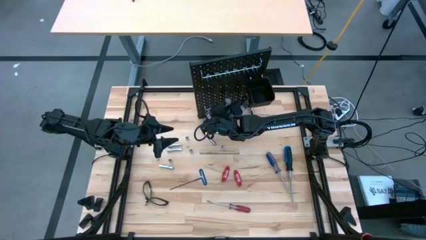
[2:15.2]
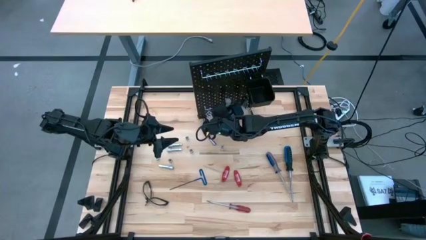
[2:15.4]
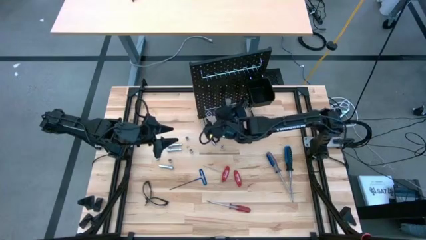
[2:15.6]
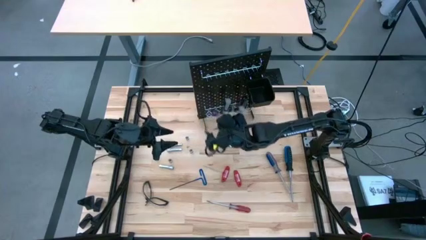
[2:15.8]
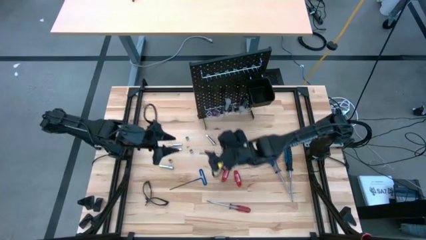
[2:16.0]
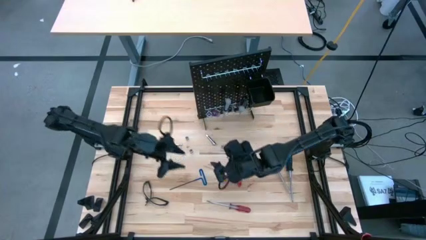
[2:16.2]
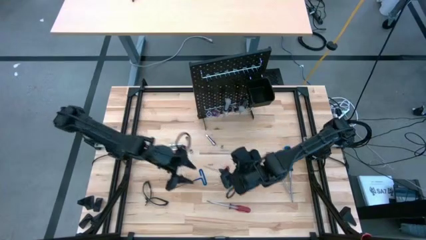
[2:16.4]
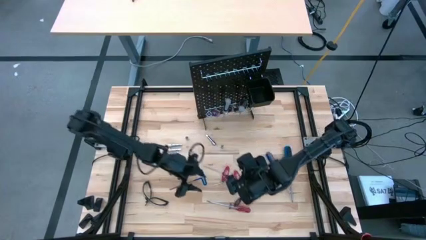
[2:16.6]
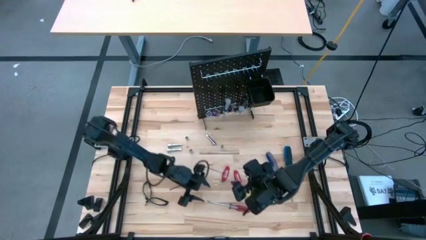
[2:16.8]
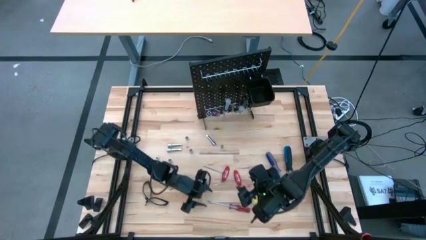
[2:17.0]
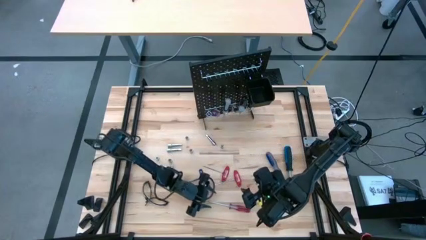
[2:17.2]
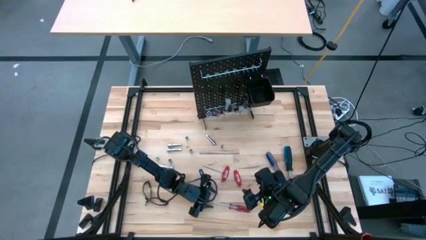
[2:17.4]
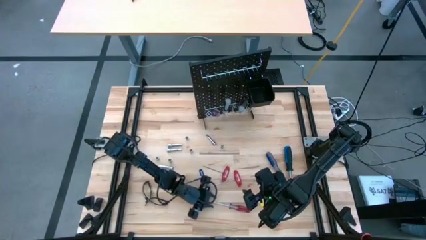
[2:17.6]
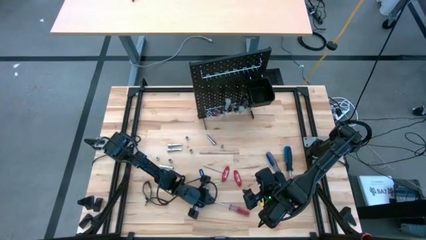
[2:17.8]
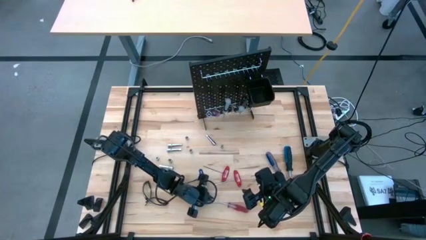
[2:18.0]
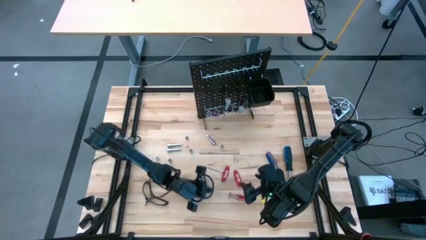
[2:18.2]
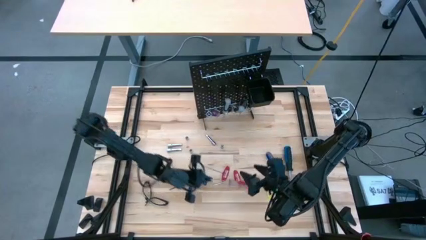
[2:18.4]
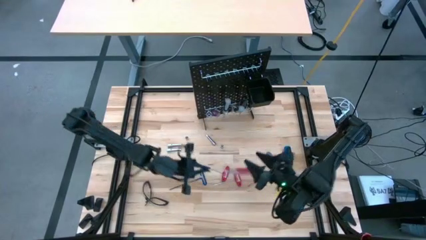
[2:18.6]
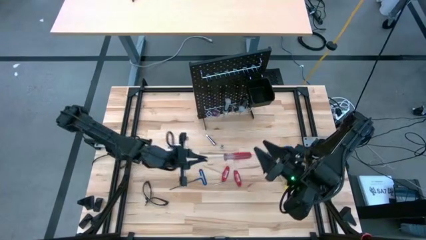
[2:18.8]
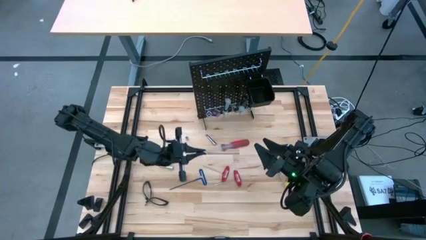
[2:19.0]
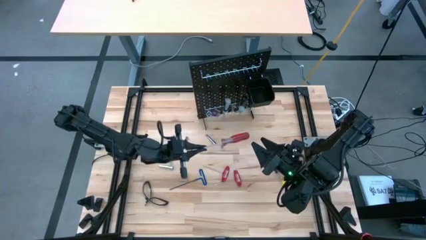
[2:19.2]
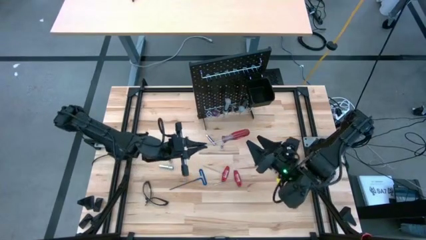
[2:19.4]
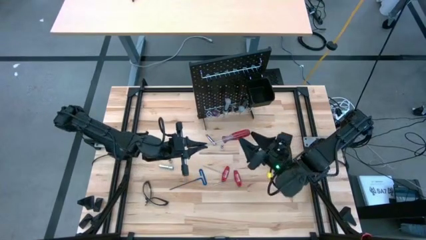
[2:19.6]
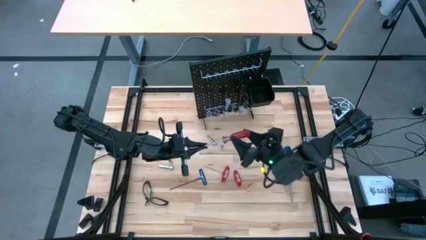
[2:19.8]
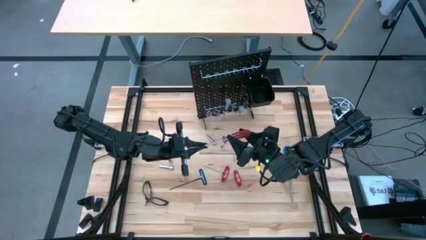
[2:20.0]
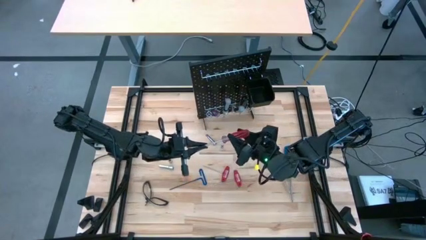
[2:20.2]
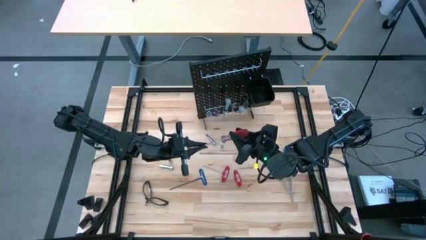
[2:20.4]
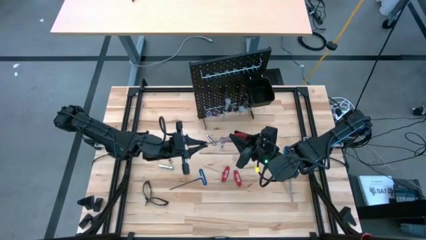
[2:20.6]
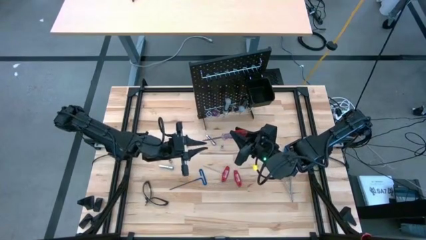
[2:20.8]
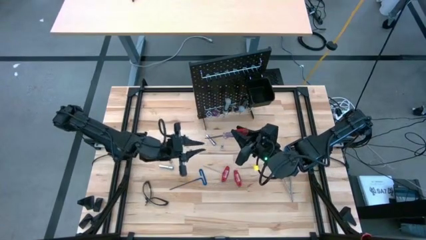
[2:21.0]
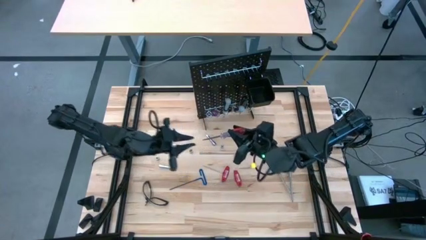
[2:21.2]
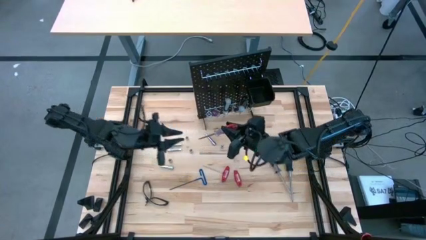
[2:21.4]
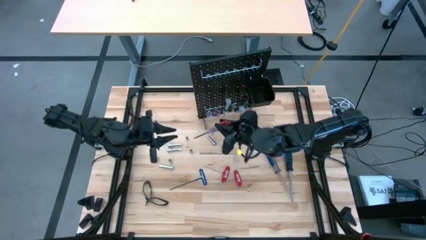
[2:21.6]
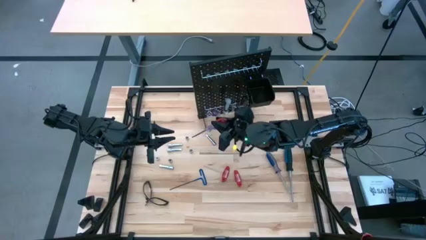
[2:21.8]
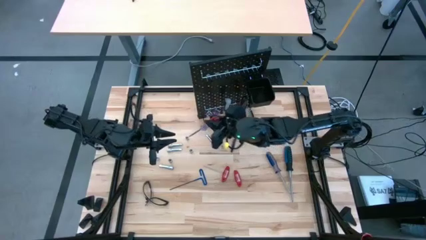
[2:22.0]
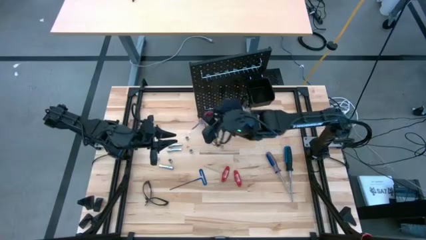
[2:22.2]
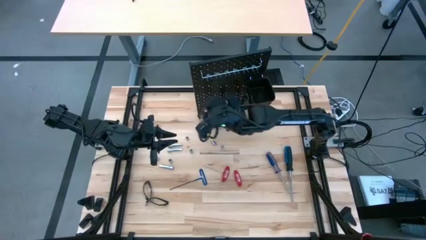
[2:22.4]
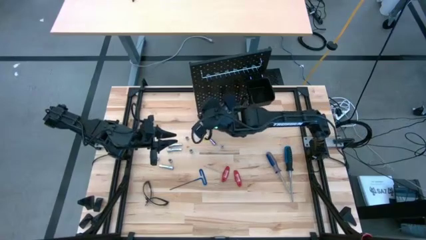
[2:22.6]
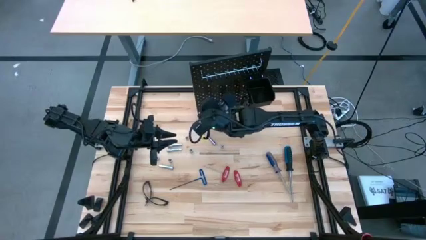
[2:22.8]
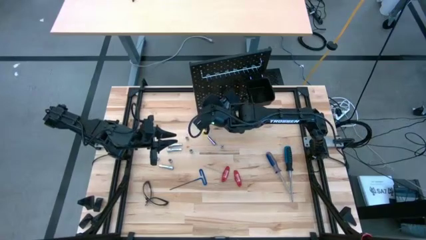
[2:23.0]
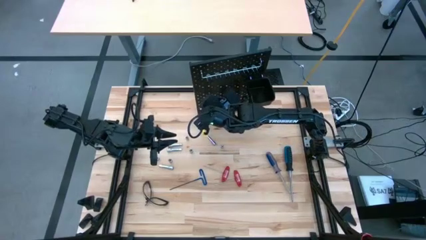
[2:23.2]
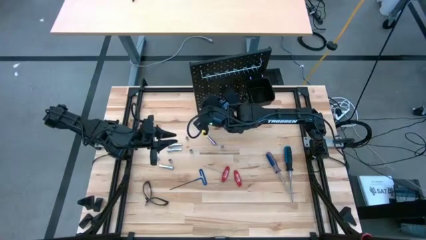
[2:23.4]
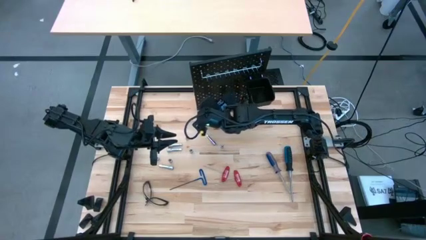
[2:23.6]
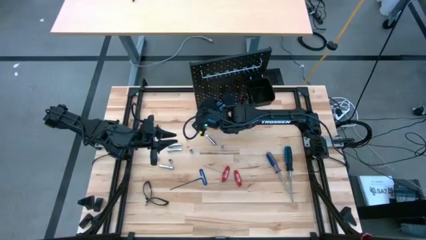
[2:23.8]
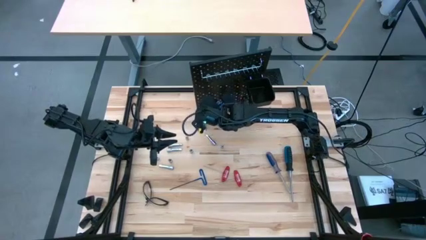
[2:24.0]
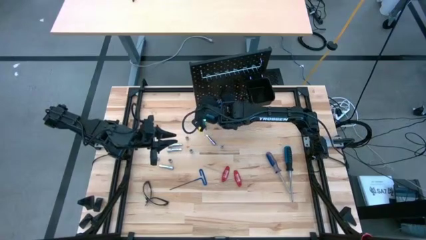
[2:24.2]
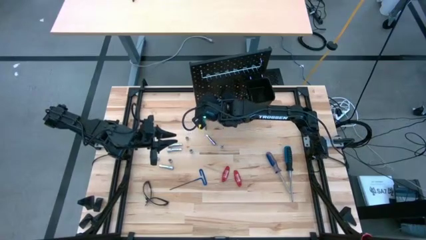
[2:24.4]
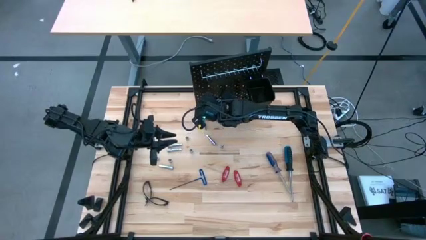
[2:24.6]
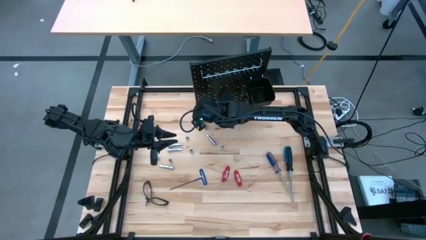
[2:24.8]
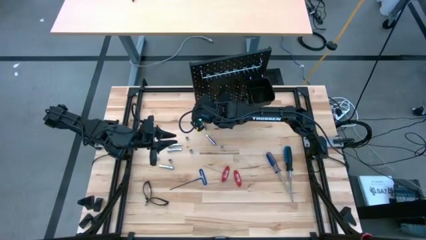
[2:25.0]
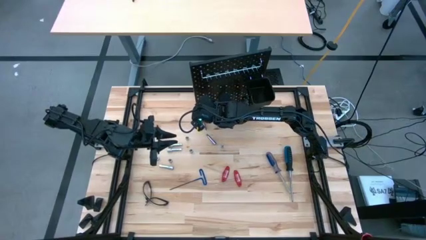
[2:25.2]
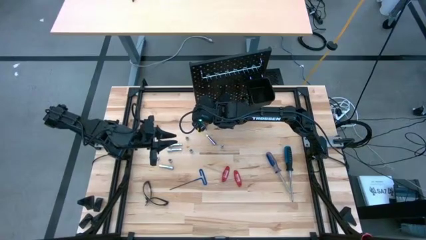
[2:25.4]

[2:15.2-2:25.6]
Task: Hang tools onto peg board
Hang the red screwdriver on the pegboard

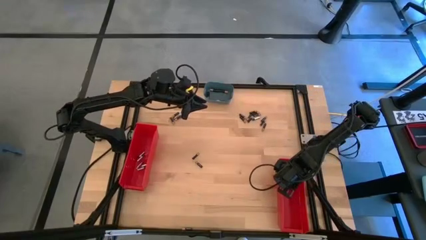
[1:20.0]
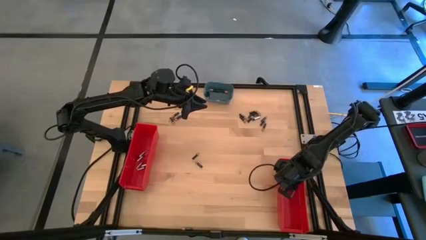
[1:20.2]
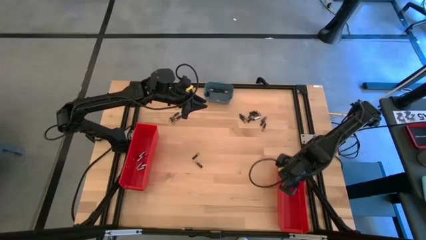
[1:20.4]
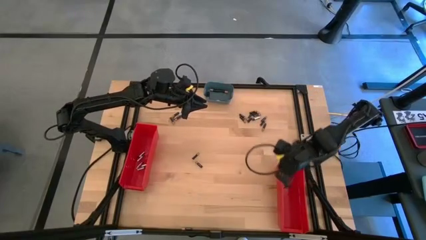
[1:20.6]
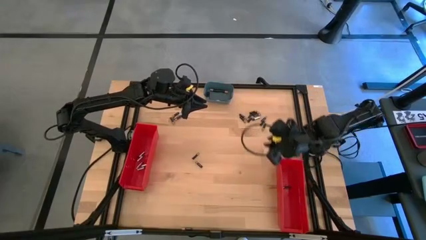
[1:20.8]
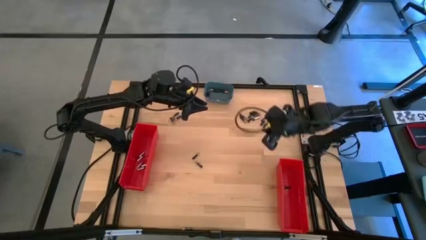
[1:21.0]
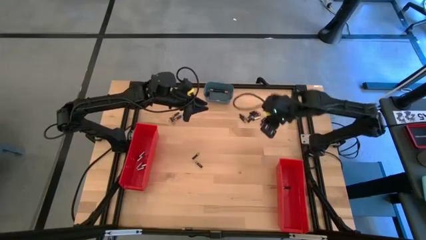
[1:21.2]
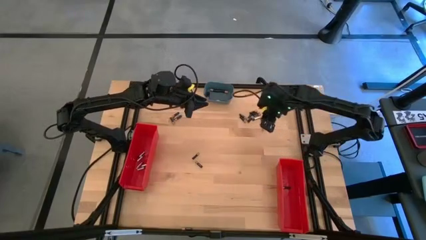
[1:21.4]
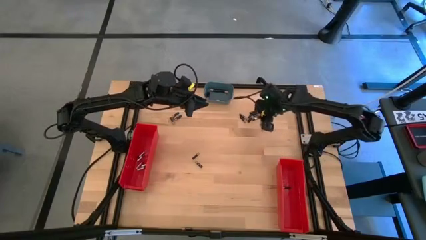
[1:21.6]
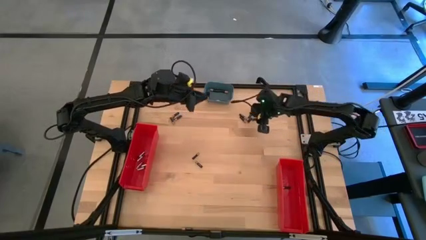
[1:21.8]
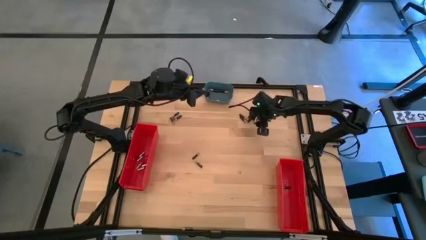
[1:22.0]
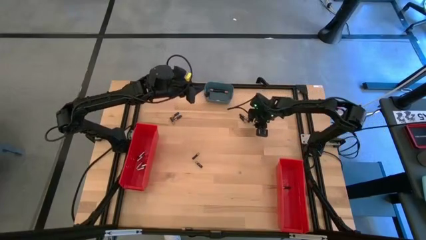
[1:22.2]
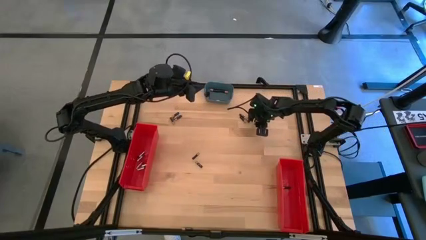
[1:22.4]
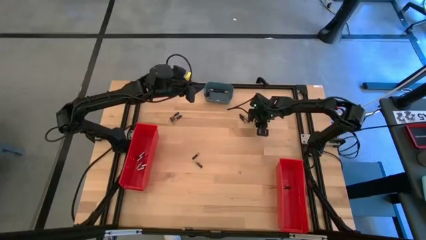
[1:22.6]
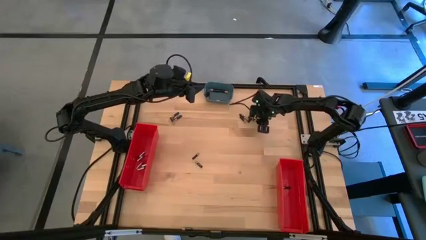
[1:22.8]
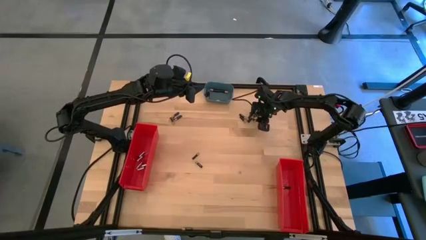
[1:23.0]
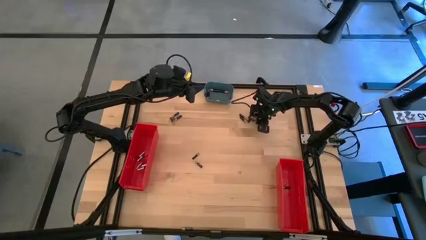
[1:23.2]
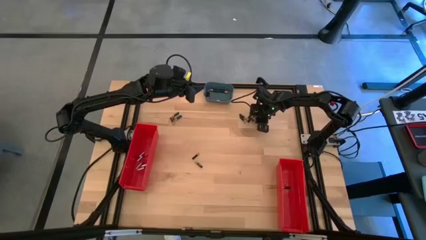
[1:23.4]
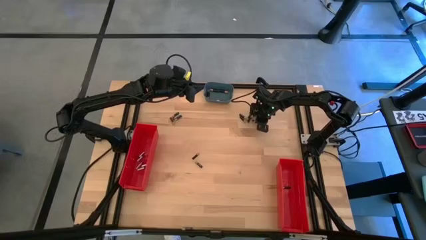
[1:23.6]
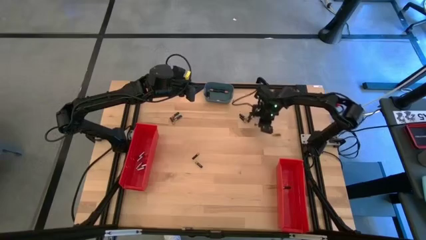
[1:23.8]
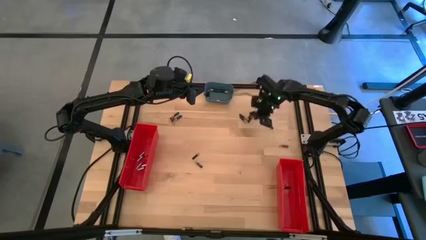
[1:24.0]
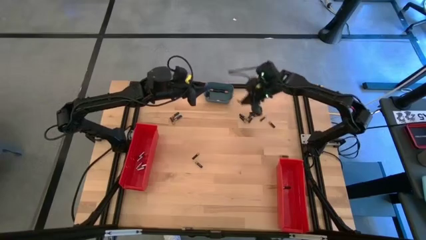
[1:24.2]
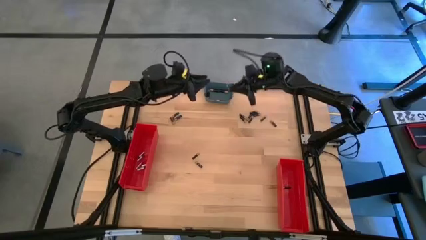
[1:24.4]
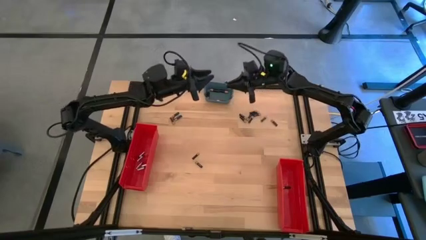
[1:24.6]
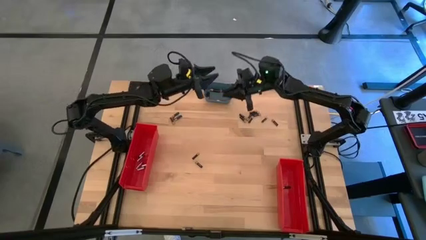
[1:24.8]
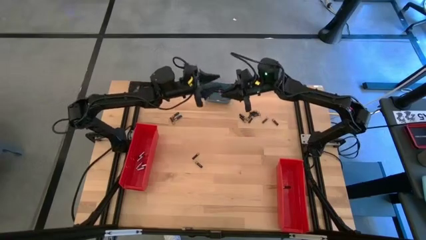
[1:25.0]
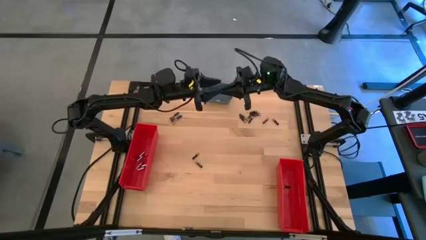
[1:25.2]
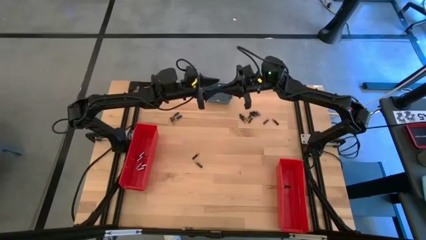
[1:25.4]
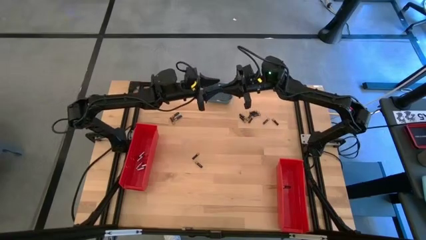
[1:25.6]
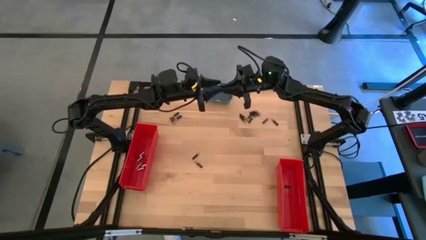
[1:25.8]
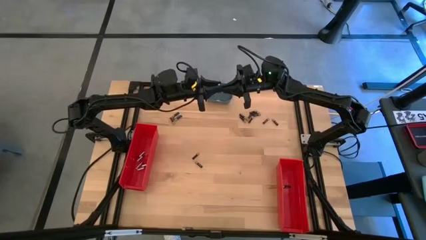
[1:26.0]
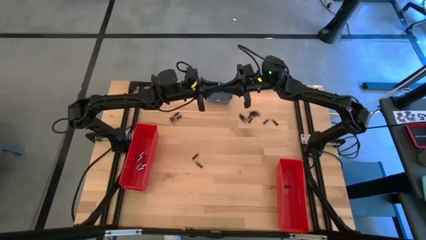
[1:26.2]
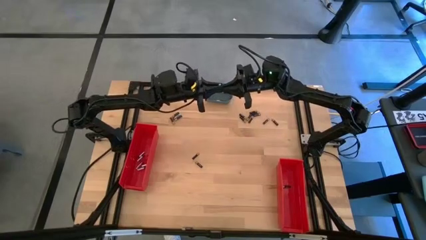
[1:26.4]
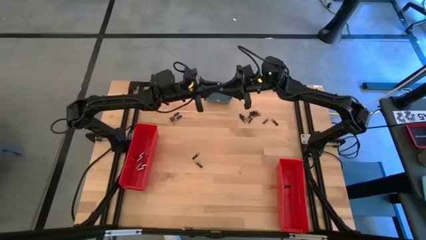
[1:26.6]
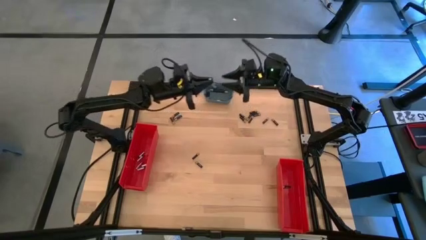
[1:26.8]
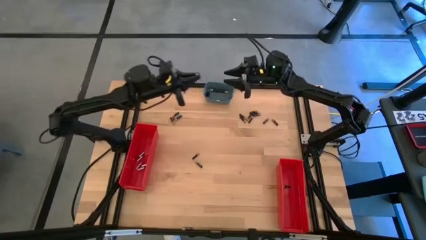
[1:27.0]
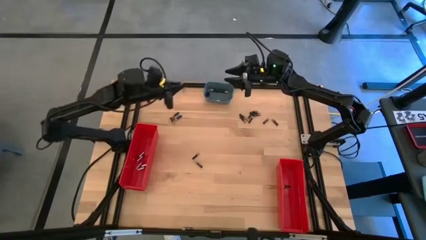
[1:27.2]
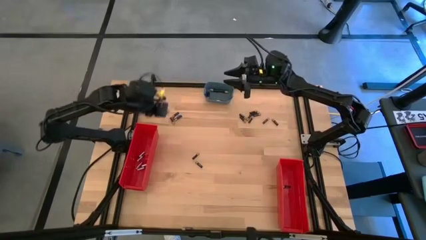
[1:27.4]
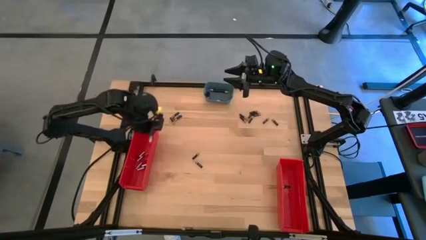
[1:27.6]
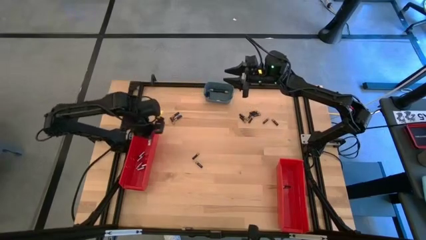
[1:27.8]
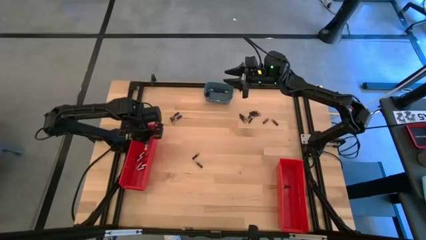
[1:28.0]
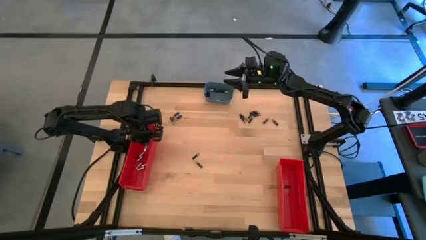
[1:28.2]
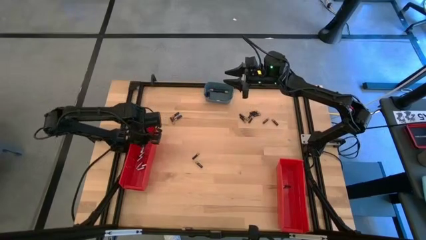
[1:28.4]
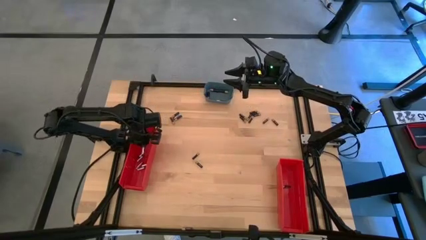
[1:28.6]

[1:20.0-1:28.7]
Task: Sort batteries
Put the silver battery into the left red bin
